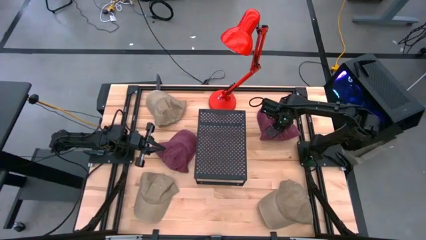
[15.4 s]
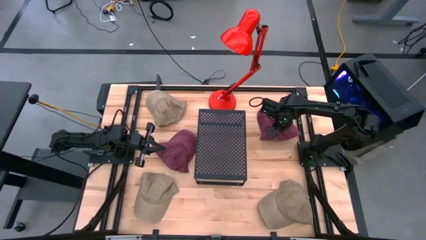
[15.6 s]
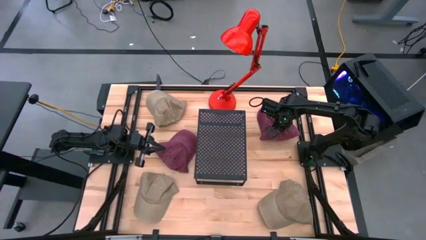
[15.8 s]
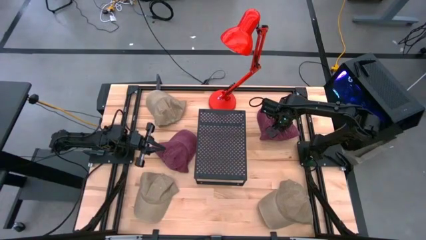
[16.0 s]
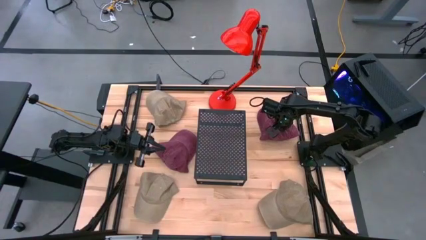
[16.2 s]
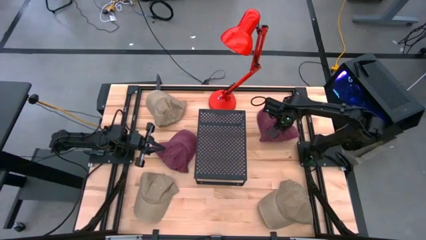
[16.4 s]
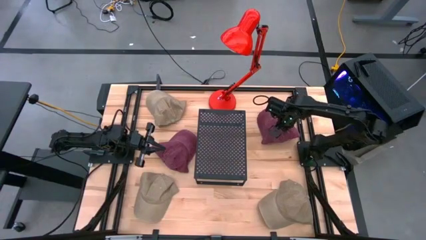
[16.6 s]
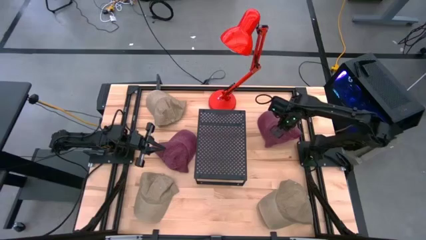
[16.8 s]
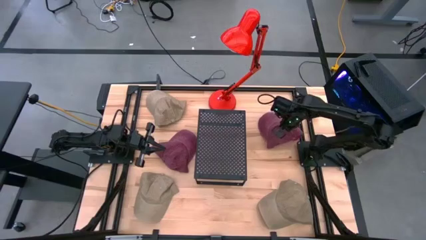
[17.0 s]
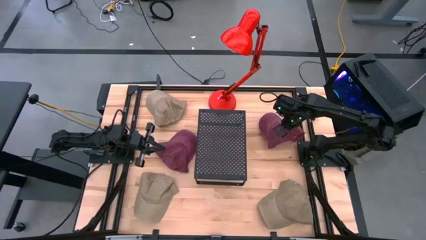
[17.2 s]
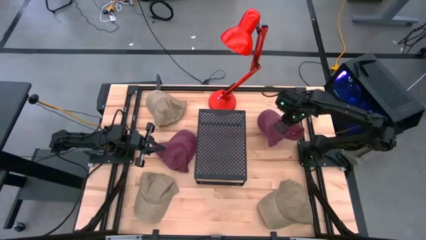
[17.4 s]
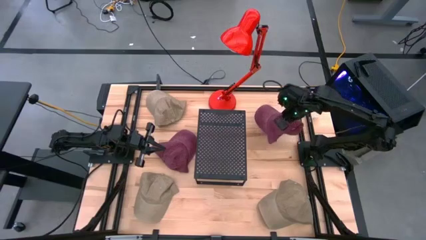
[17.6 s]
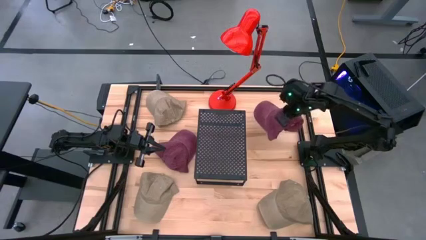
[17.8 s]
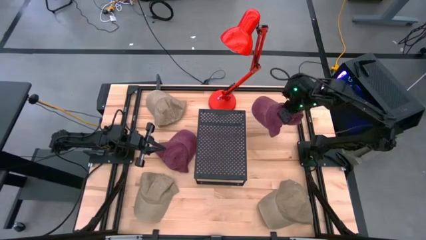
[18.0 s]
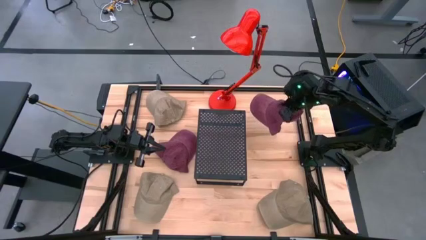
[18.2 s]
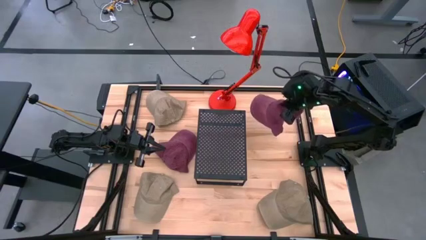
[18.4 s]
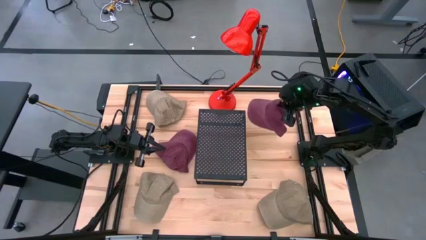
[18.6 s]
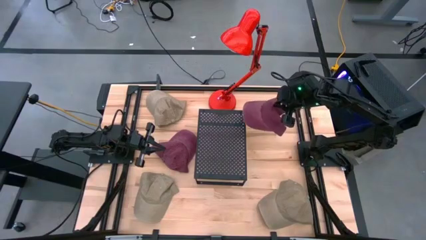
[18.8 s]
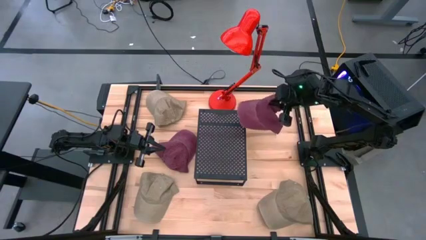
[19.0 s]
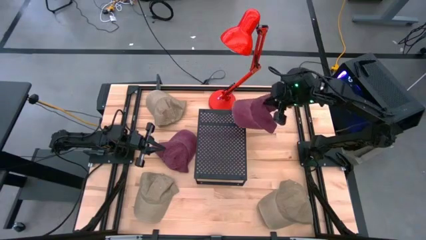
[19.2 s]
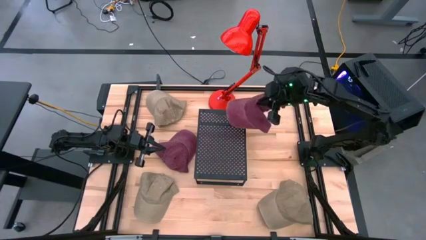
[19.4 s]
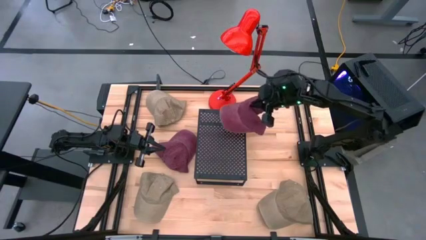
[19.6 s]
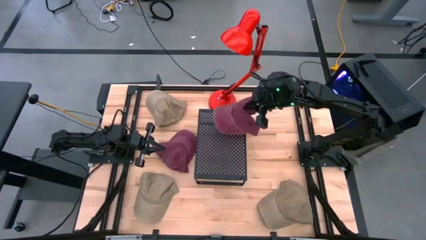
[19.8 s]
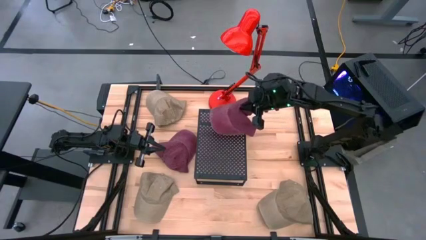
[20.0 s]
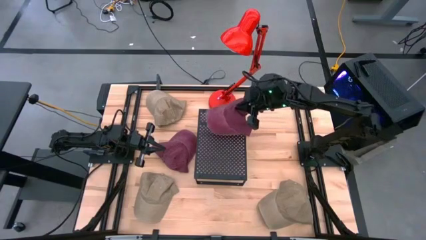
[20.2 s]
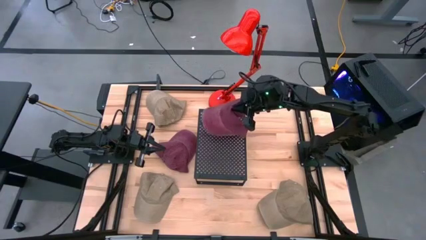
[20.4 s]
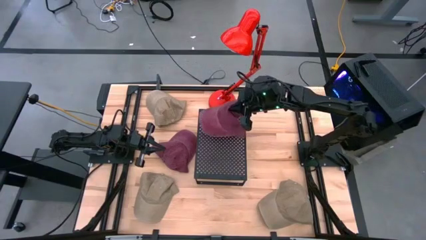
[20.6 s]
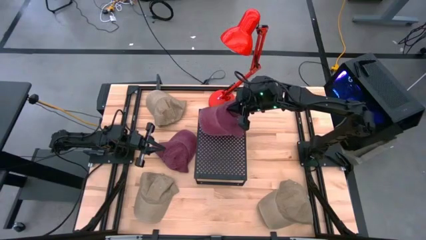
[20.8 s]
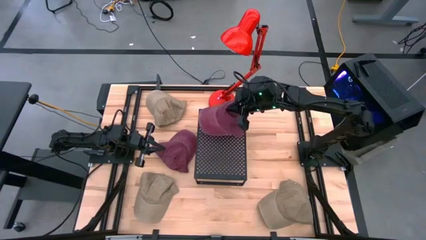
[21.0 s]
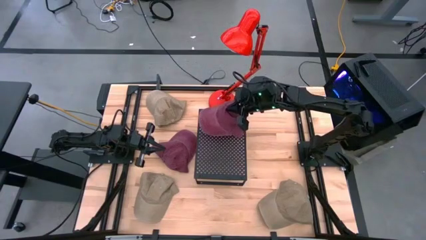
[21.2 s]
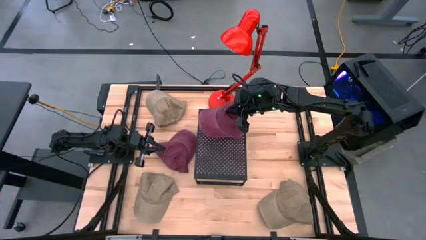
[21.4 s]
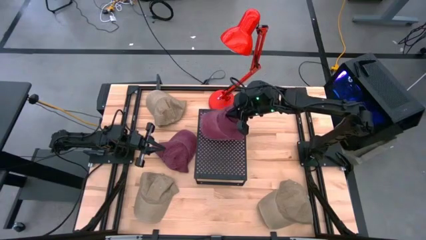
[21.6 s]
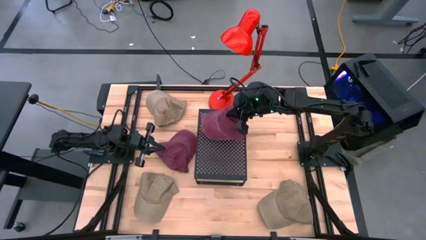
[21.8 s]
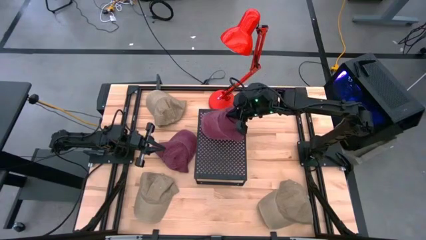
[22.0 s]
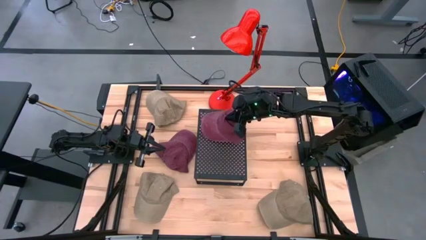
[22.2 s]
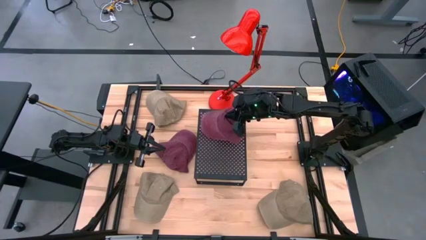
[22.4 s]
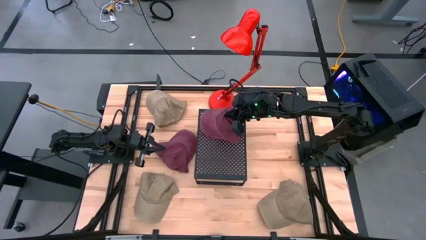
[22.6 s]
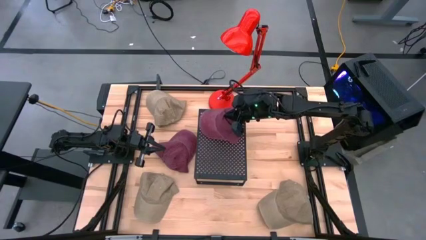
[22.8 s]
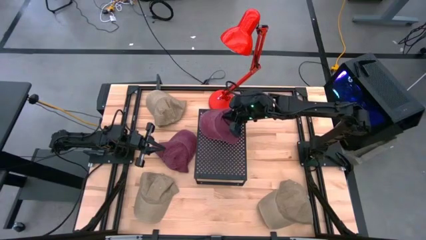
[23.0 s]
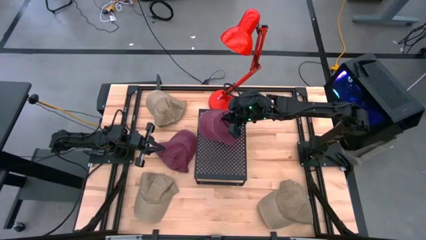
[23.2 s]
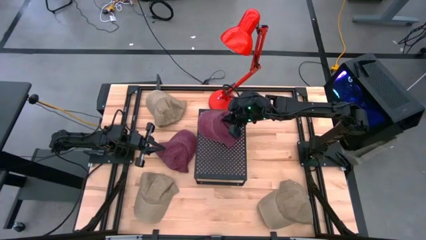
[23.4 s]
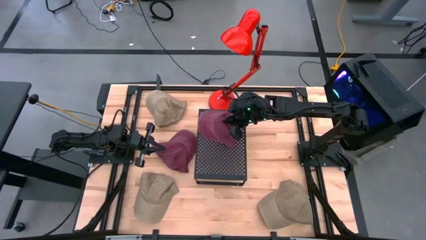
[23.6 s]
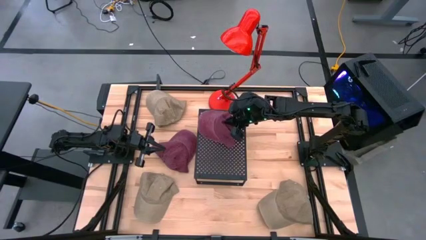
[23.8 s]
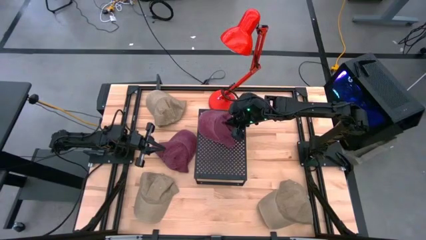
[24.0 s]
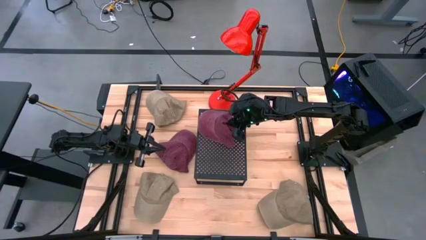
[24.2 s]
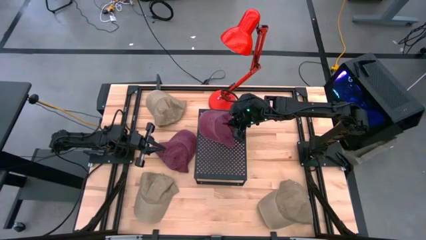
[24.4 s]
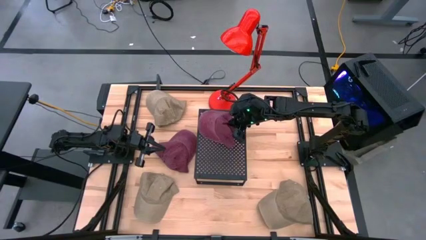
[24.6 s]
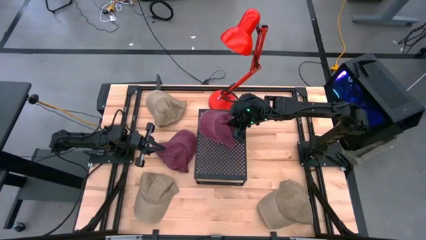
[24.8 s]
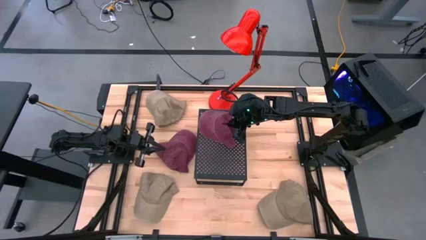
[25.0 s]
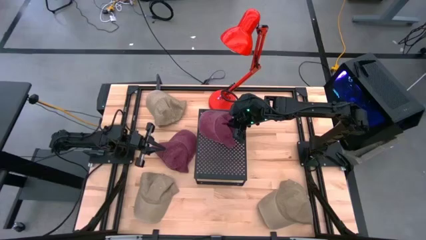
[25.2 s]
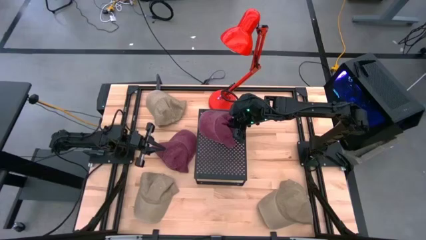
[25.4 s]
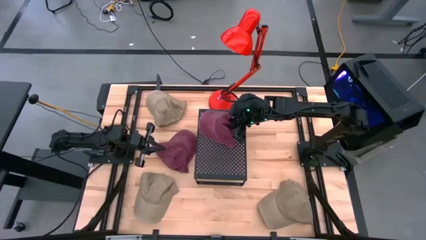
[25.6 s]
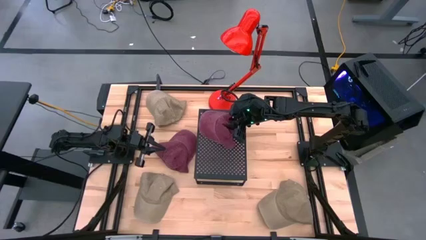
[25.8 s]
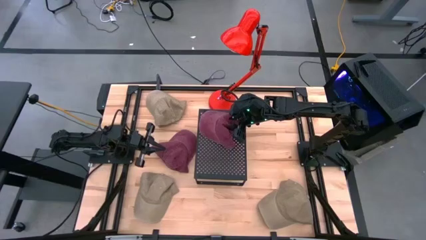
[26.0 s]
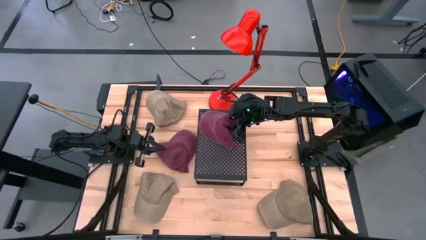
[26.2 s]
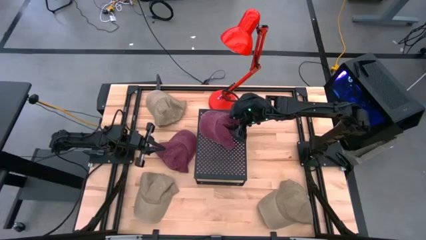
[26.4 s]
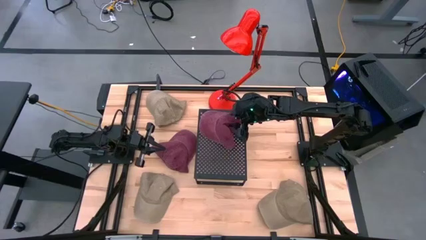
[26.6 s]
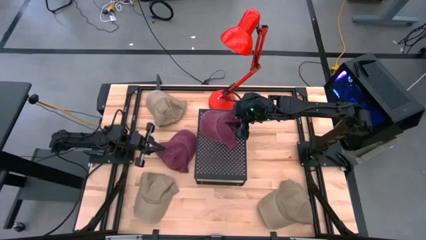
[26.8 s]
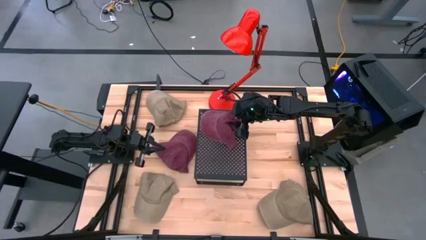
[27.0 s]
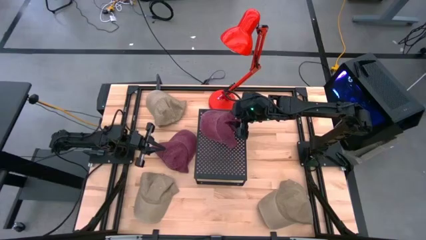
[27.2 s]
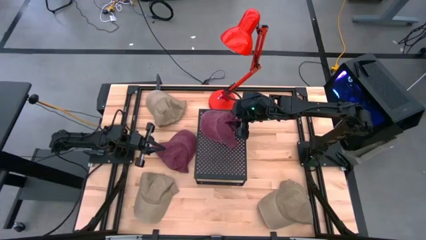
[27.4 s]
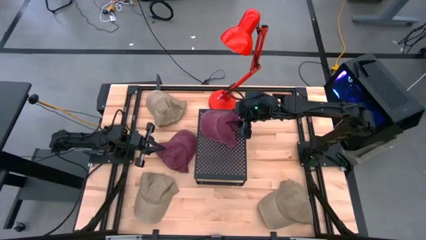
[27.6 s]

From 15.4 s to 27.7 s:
Task: Pick & Place hat
Put the right red cap on the shelf
